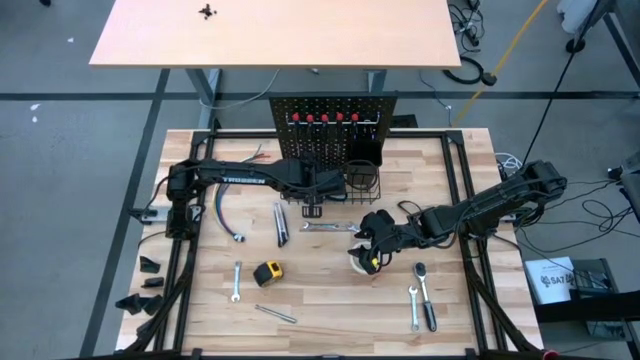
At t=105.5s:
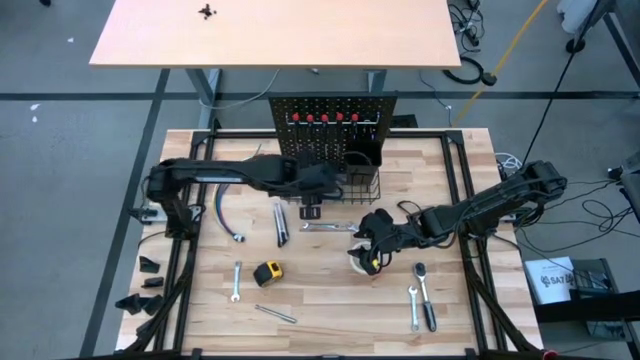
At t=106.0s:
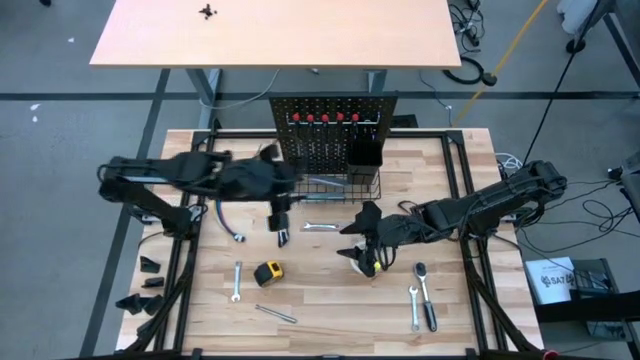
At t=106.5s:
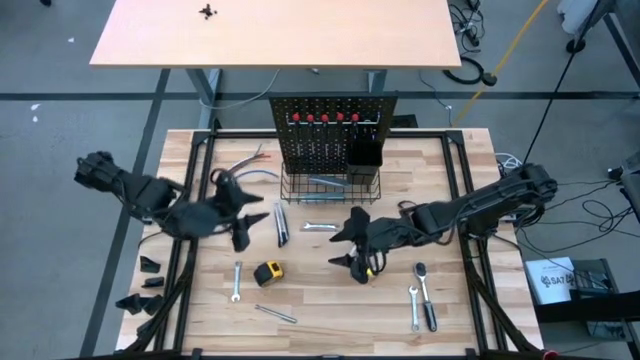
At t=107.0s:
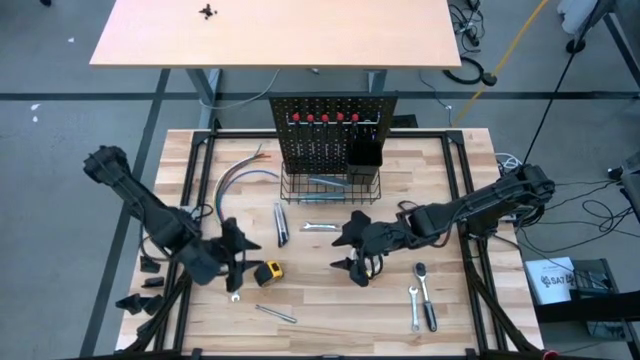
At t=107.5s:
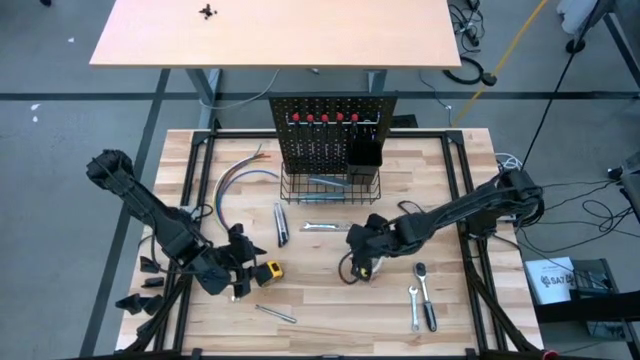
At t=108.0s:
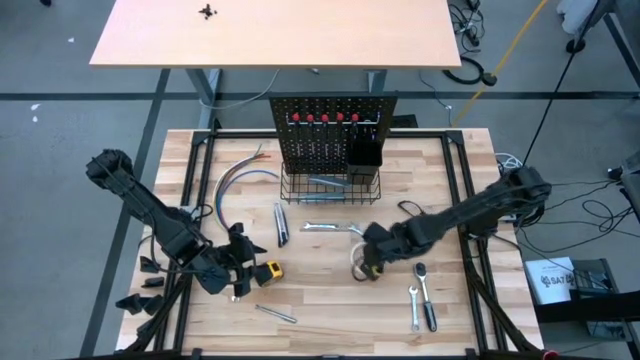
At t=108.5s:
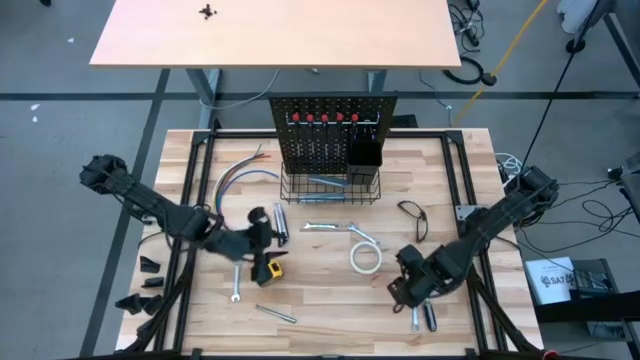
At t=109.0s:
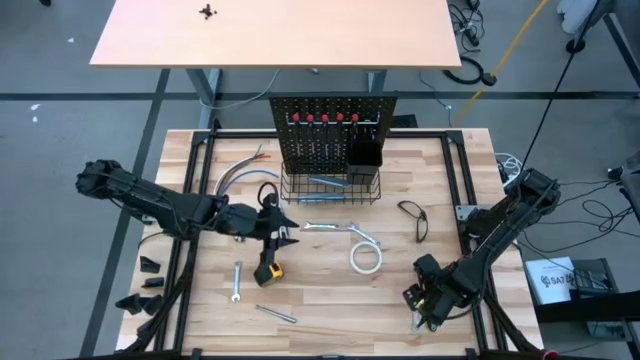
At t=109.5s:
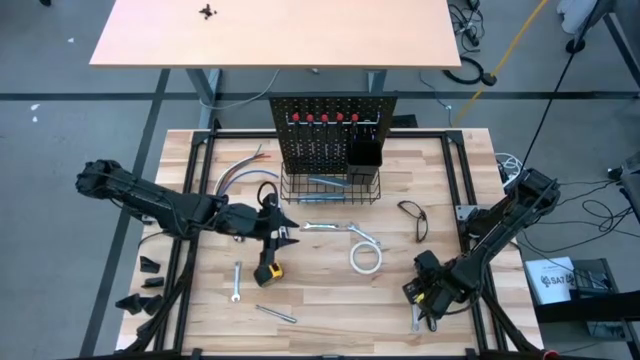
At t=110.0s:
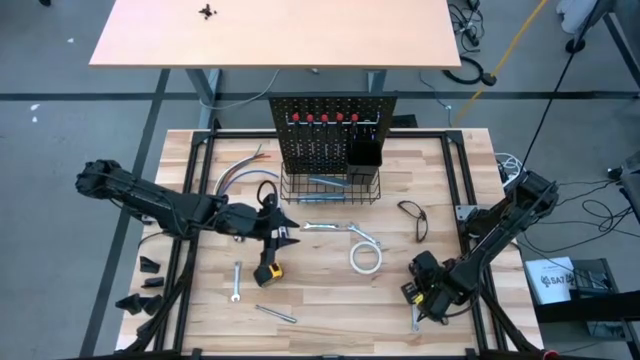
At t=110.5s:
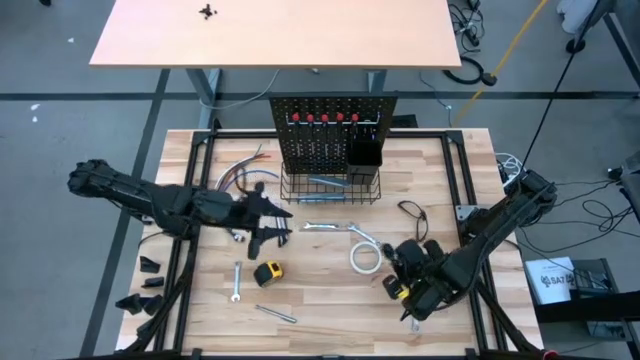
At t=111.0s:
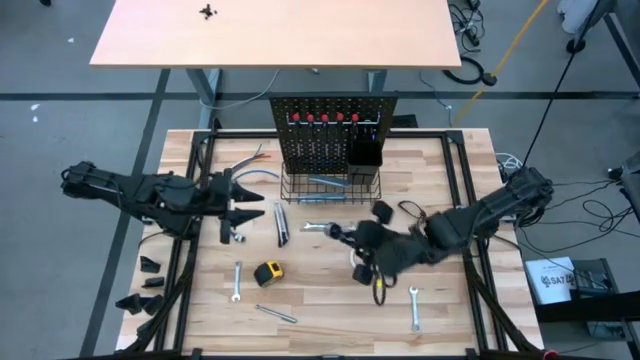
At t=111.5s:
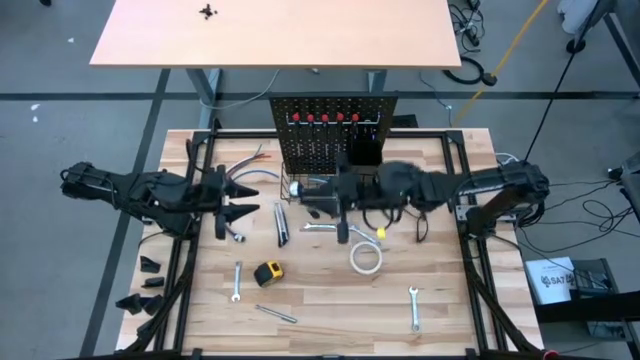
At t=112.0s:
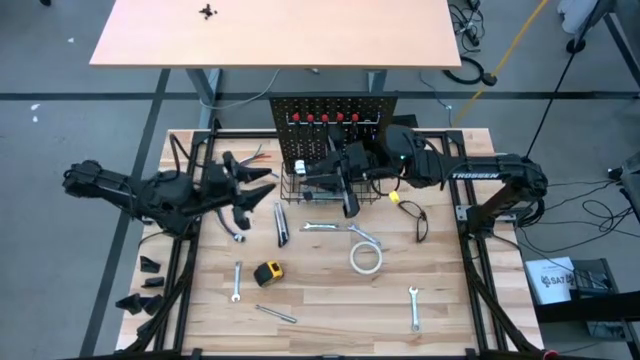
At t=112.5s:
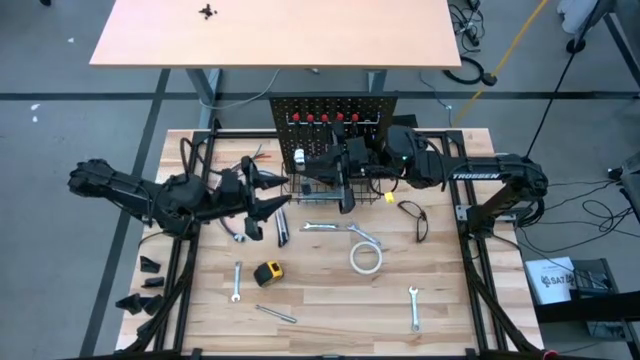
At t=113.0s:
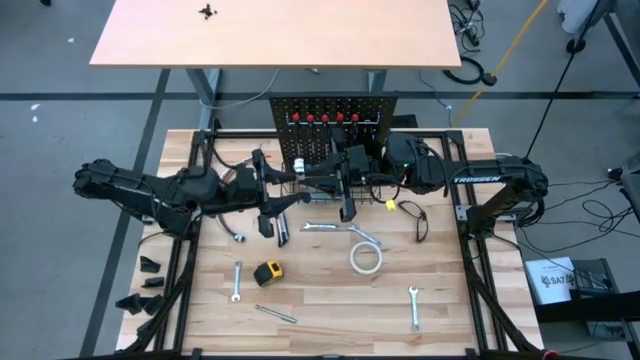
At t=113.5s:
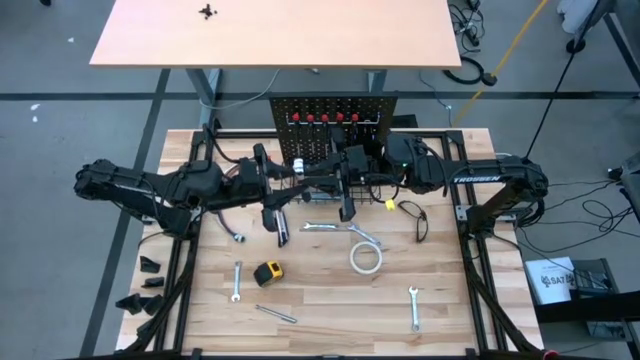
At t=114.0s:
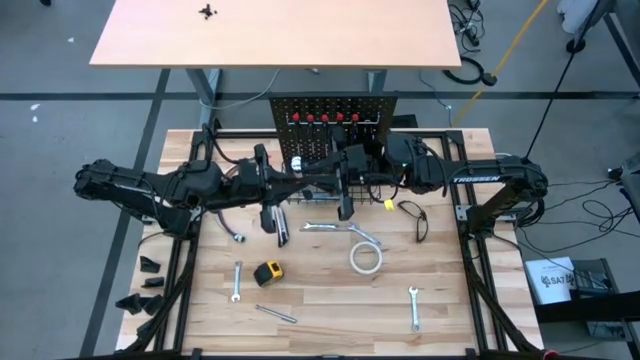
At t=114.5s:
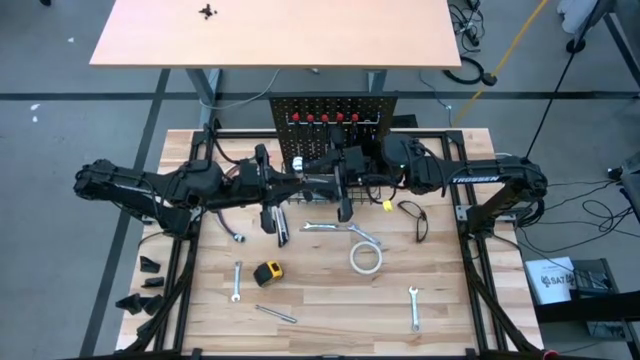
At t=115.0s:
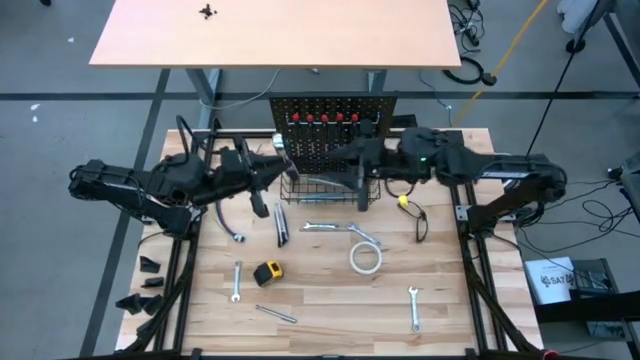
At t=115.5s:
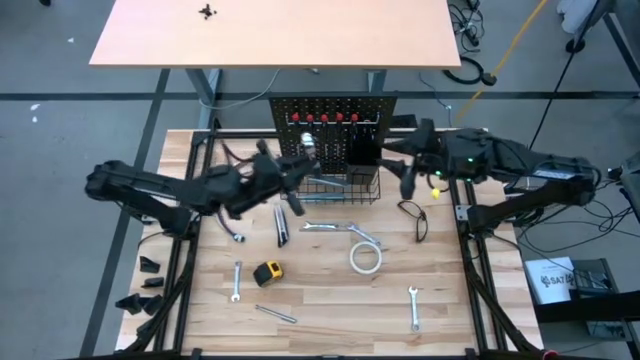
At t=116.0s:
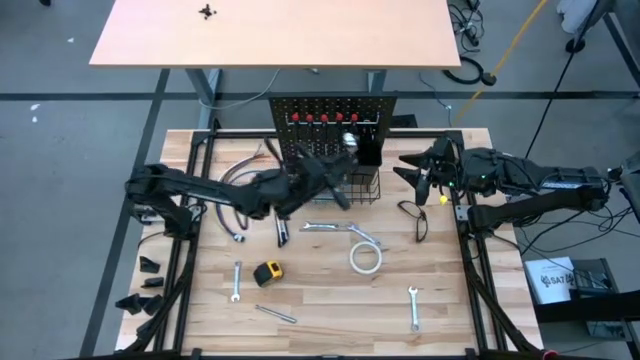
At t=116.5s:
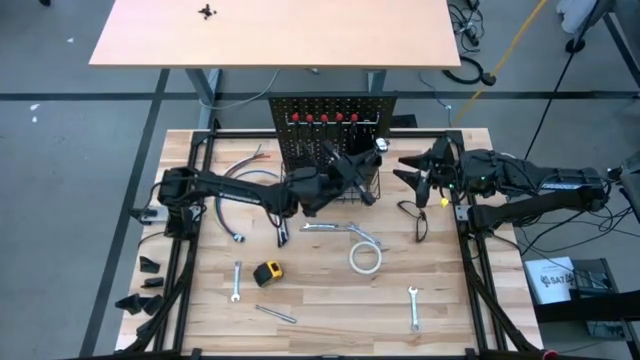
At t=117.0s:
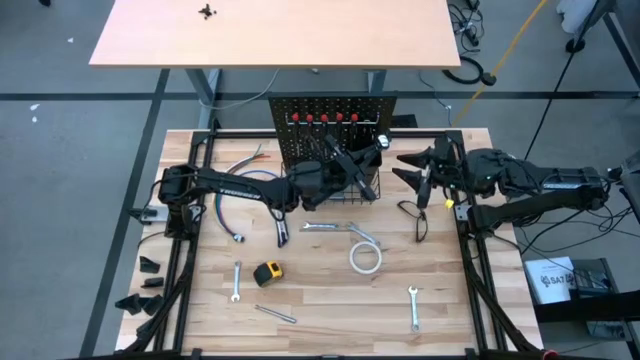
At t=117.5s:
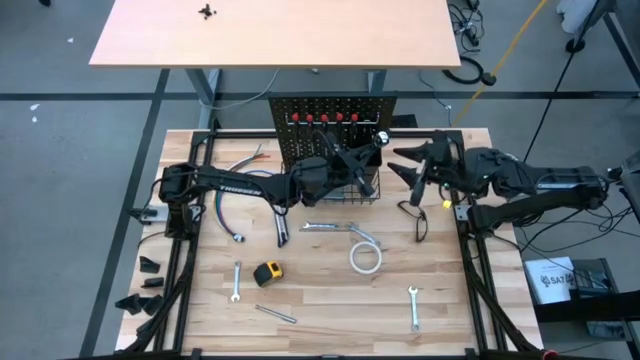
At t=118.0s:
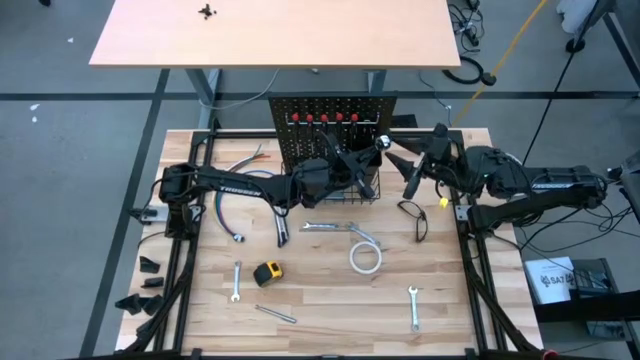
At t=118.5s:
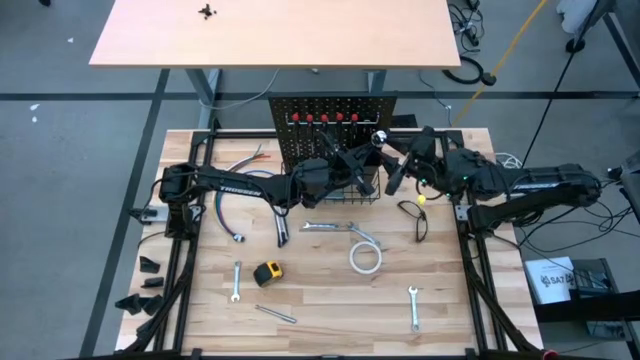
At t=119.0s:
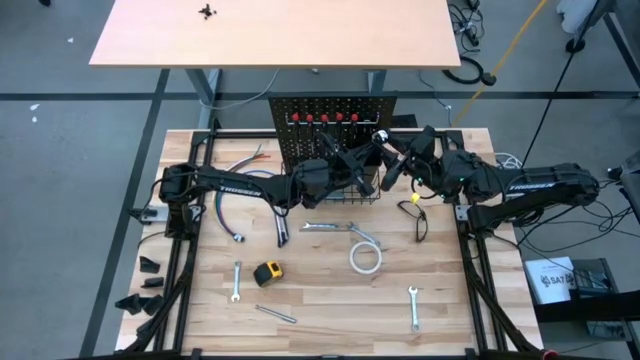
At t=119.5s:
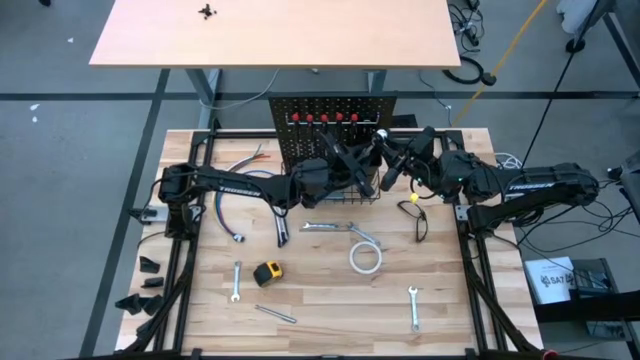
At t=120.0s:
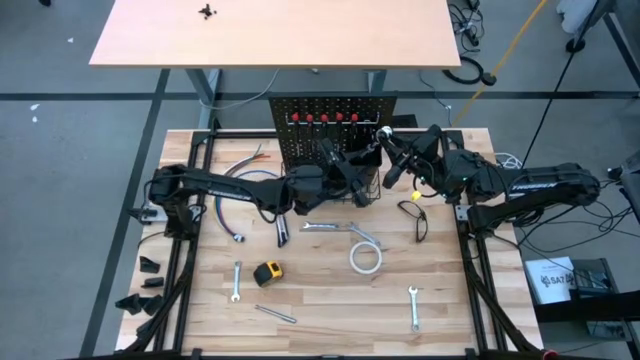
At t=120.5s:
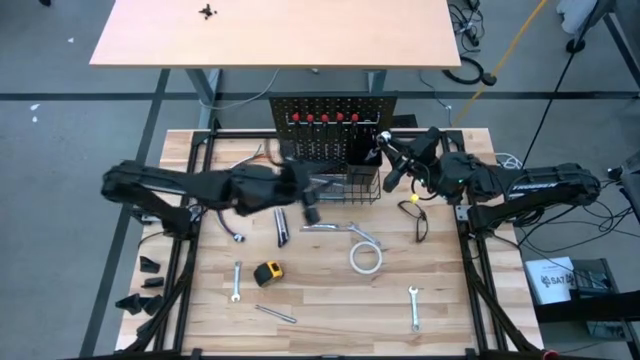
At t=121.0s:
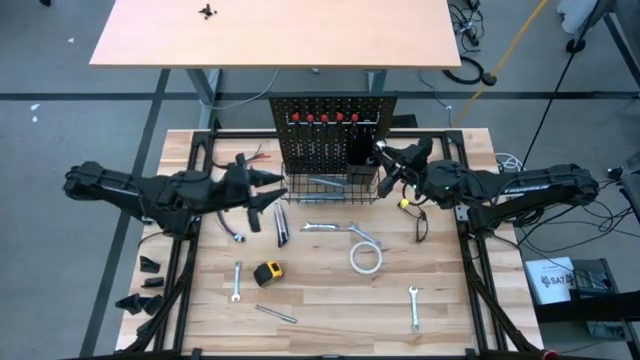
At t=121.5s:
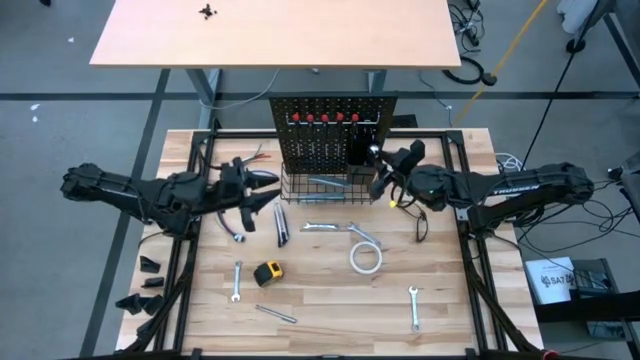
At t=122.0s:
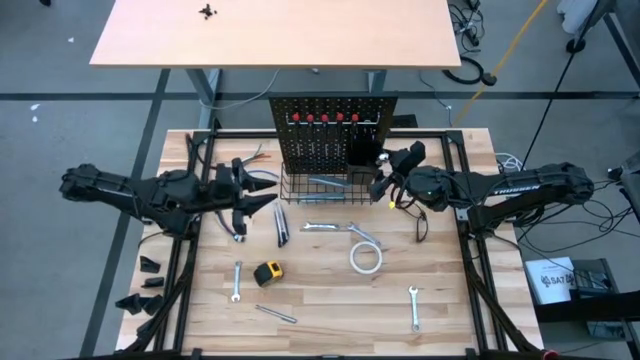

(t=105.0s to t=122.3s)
Task: Hang tools onto peg board
Put the ratchet wrench into the pegboard bin

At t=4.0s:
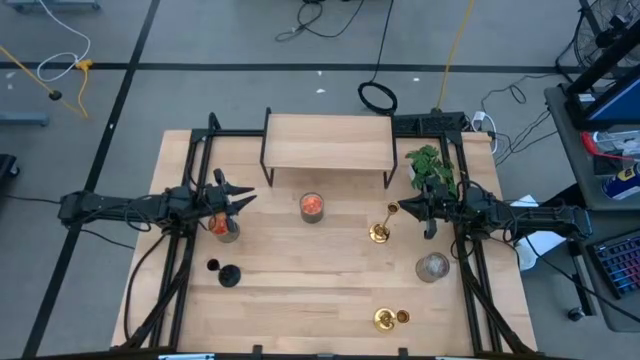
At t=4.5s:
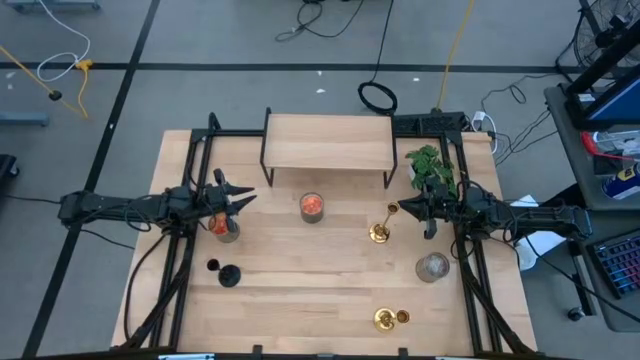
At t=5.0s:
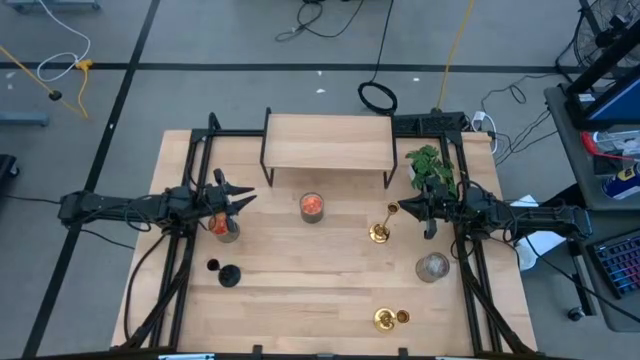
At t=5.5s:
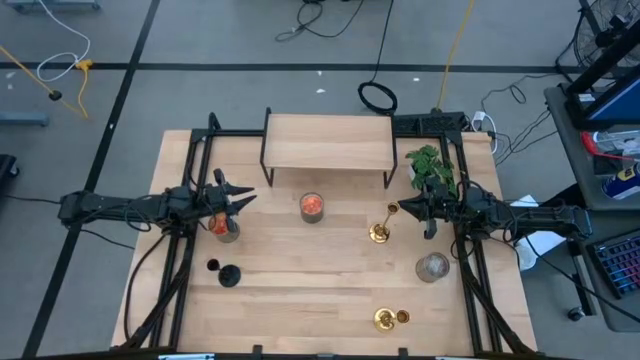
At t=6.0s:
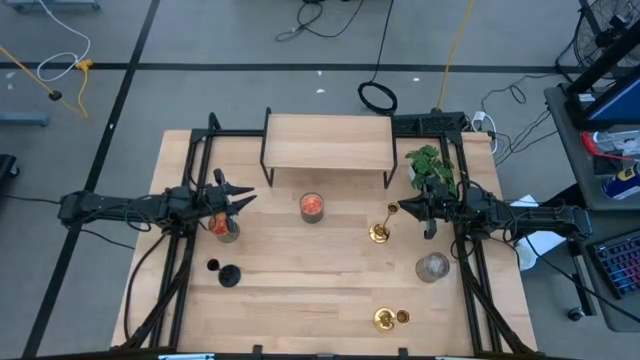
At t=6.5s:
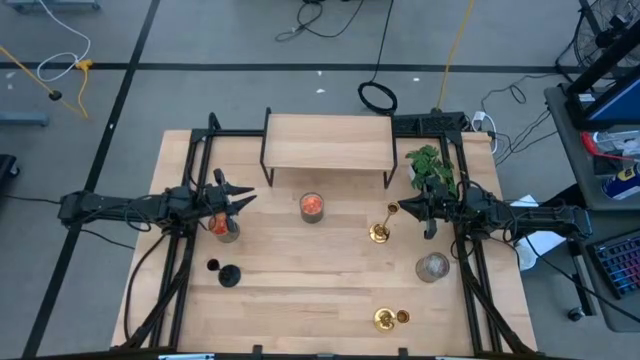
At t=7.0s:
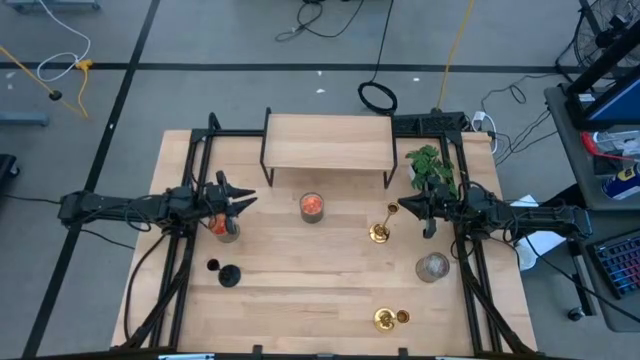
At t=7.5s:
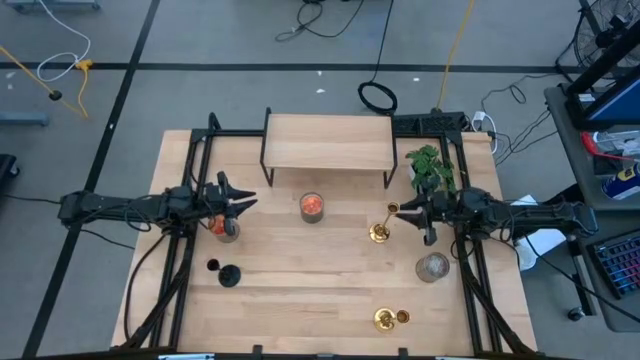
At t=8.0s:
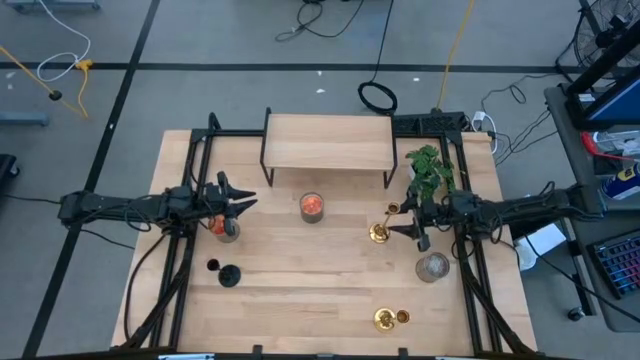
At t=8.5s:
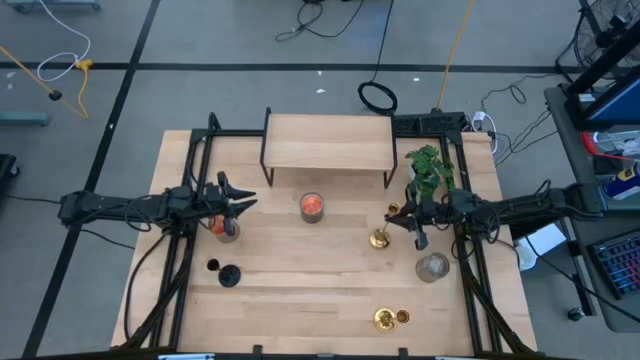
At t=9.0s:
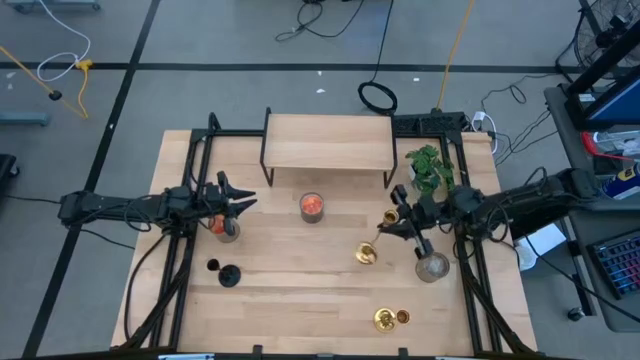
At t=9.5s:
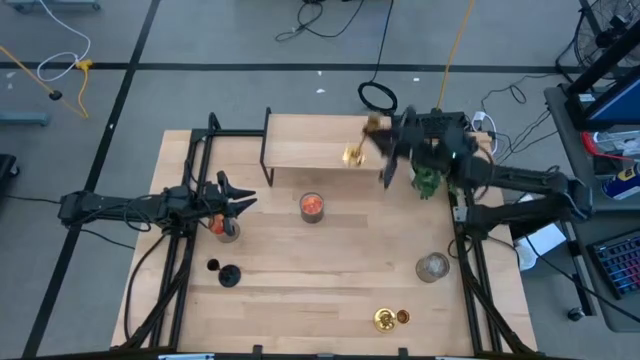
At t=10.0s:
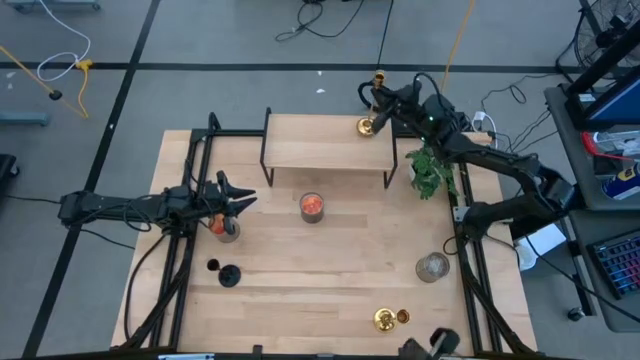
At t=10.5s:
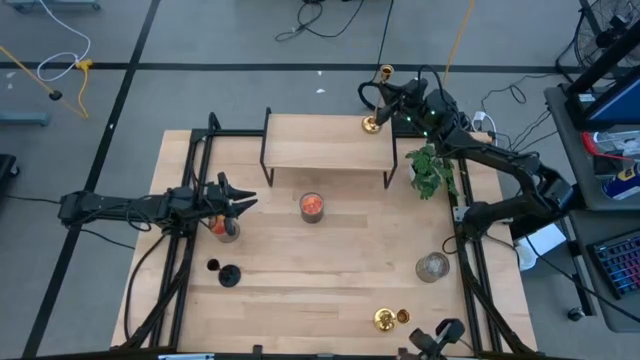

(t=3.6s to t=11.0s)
Task: Pick & Place candle stick holders
Put the top gold candle holder on the shelf
